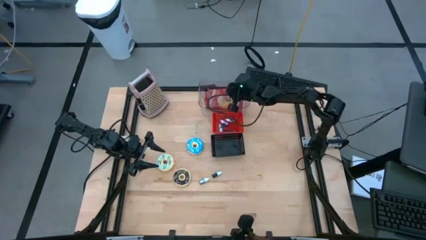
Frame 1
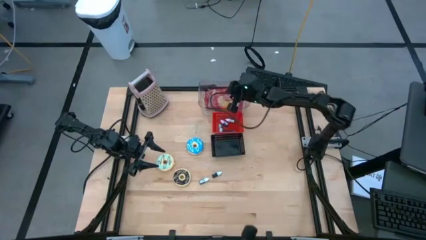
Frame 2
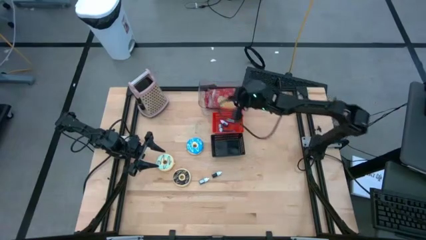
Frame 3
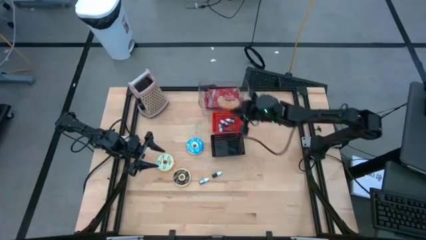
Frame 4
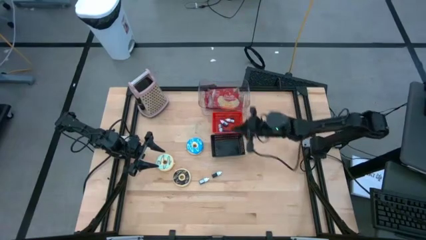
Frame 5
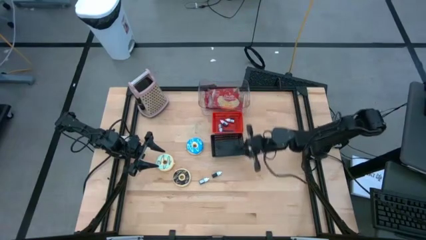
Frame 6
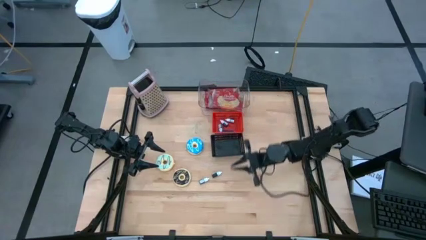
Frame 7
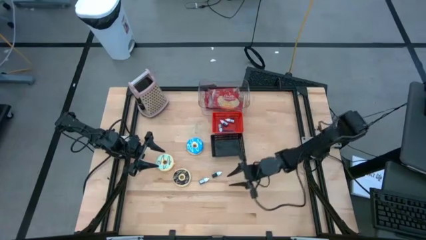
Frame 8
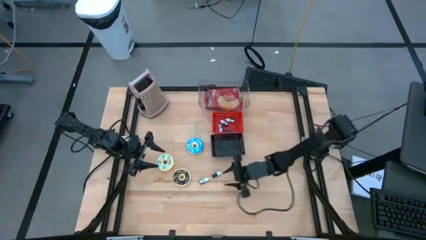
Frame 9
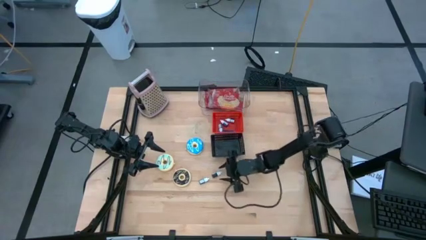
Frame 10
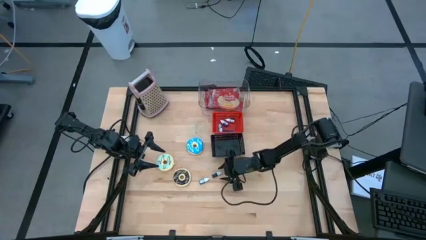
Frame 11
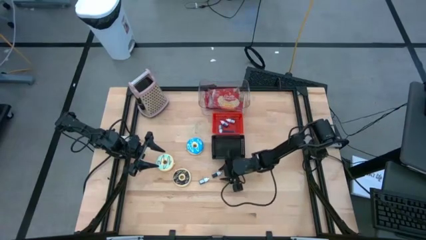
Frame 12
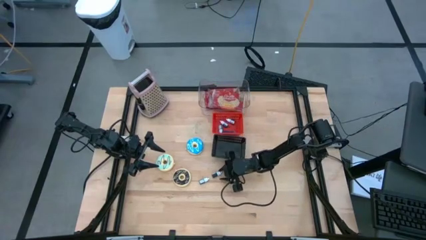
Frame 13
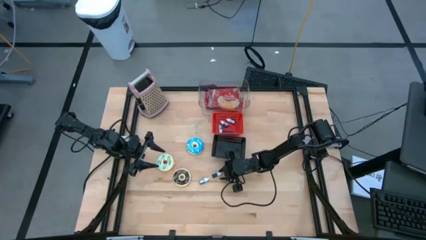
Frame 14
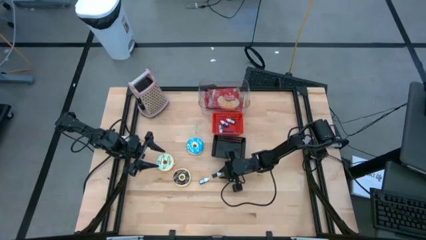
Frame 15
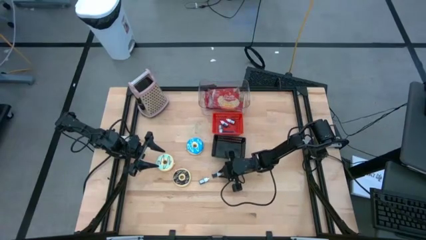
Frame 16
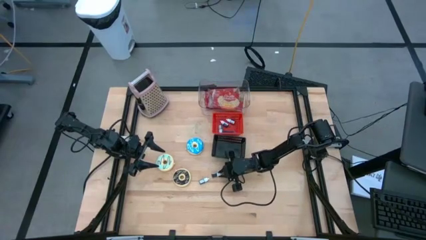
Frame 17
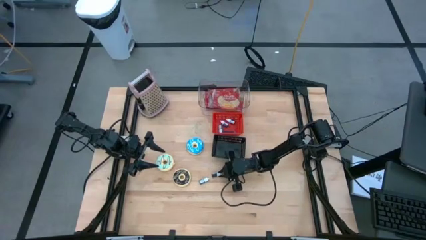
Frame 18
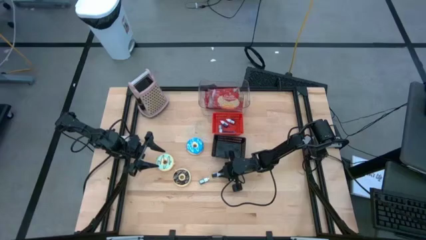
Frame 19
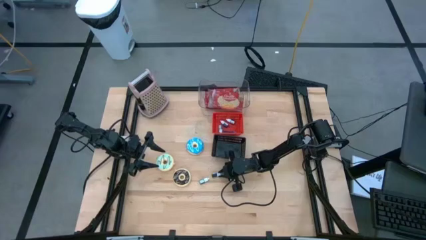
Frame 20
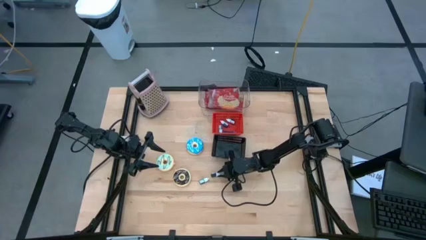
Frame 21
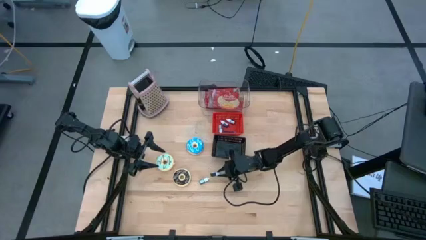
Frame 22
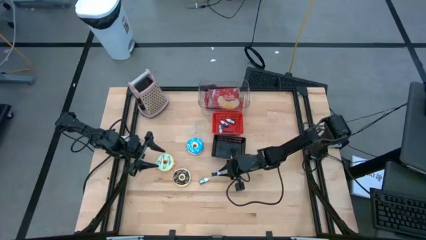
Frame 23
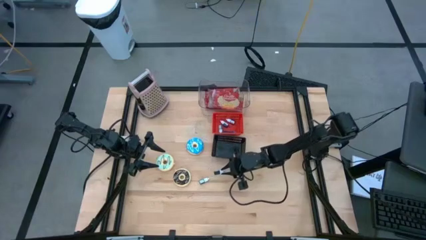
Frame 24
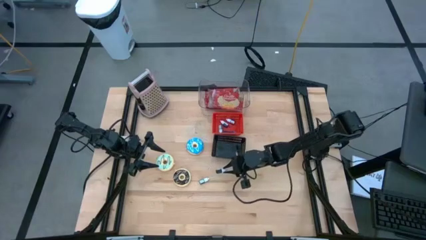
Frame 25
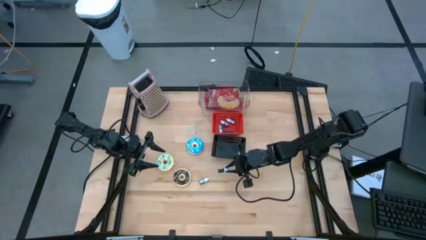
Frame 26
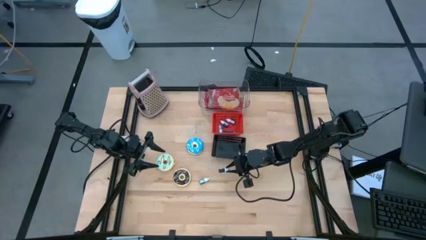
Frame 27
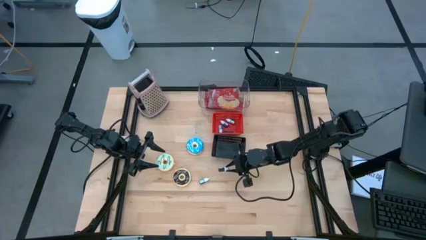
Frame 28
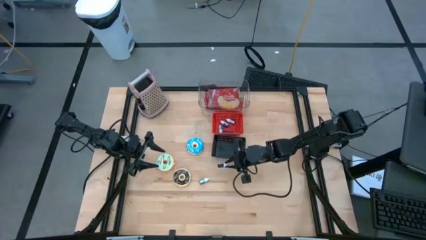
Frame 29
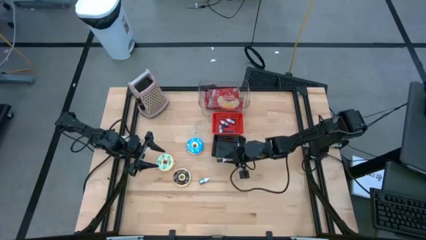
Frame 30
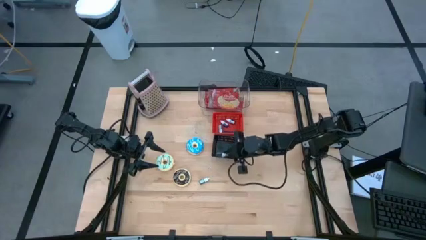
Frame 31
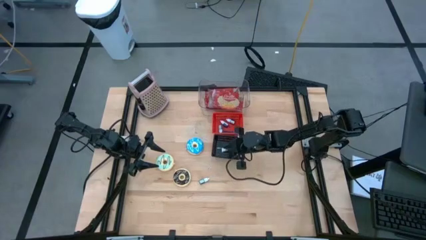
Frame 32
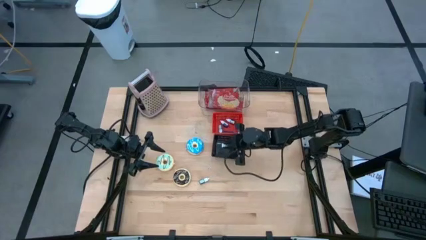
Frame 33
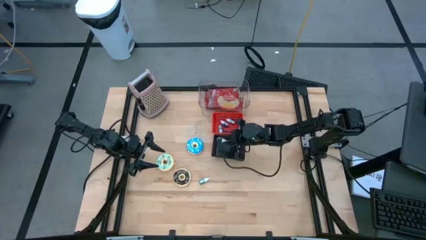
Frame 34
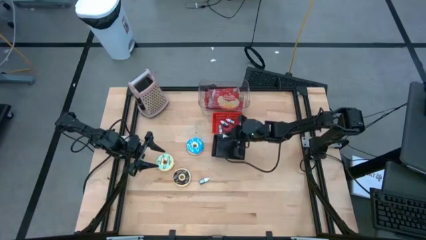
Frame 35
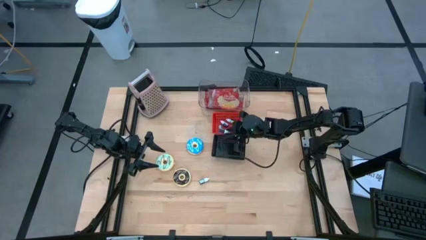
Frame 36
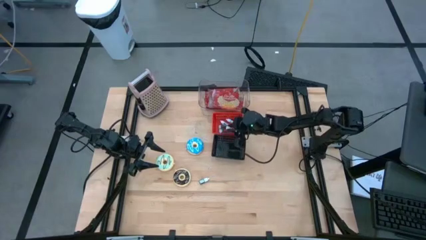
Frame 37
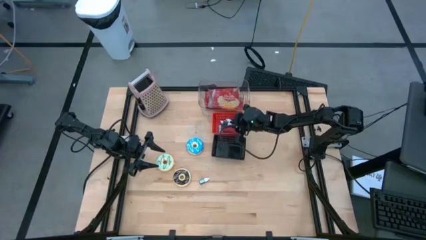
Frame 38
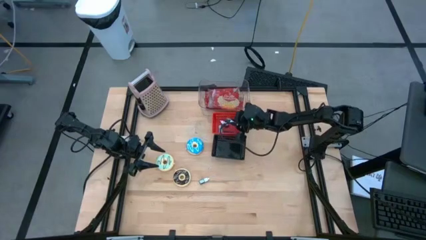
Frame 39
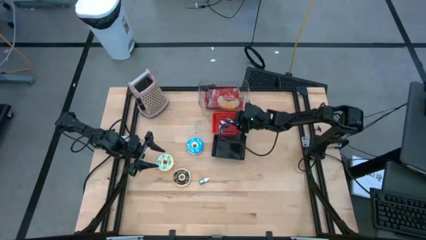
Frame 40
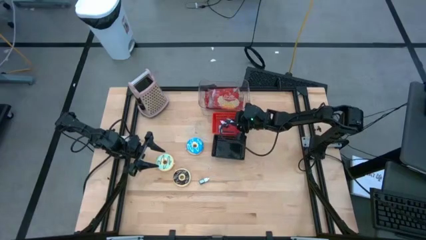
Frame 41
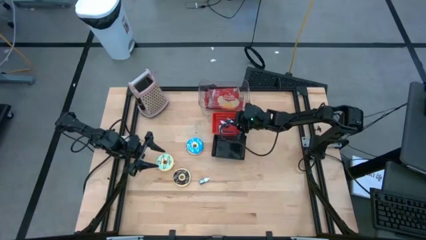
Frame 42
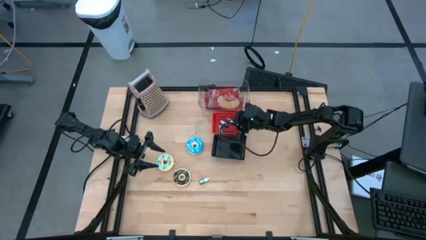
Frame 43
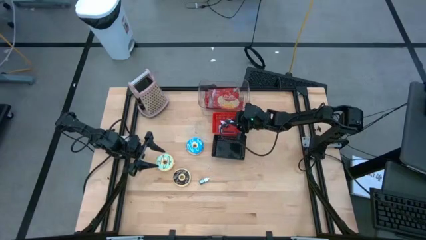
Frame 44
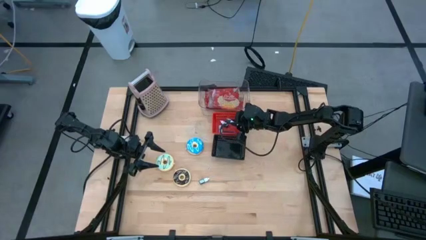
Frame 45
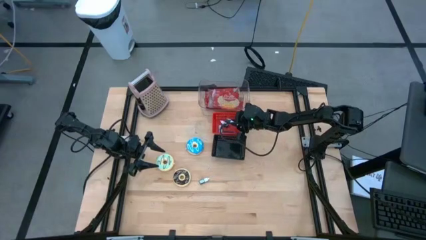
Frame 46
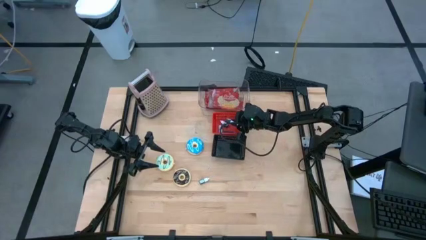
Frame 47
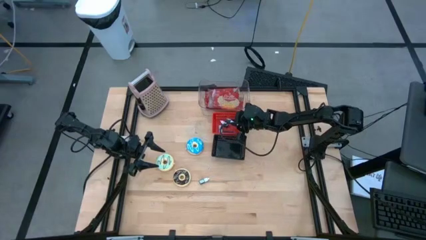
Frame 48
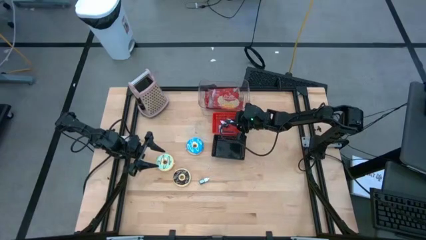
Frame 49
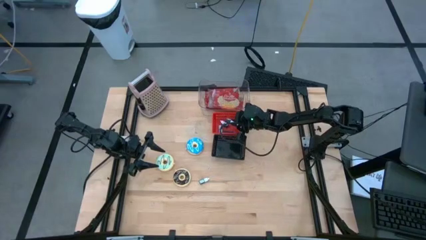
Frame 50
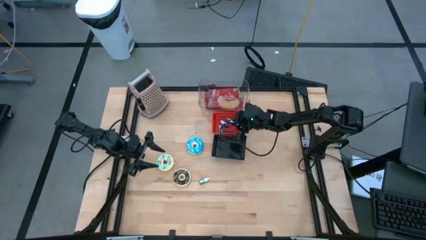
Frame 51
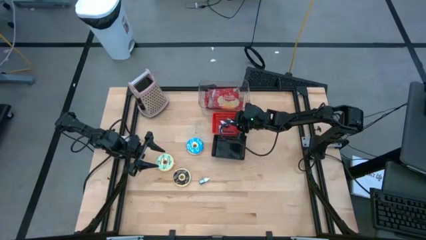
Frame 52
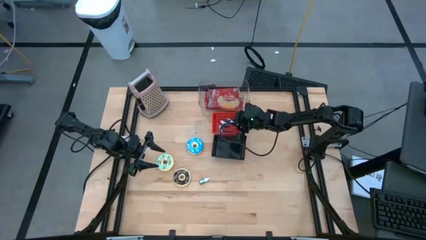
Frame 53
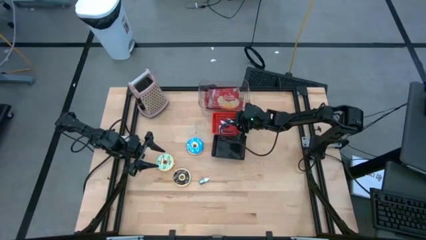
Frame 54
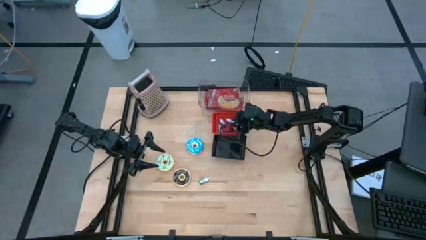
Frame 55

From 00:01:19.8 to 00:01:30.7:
Put the light blue food coloring into the red bin
